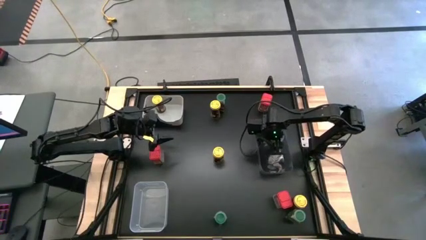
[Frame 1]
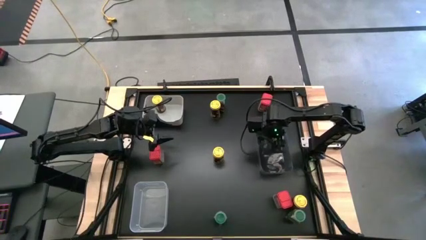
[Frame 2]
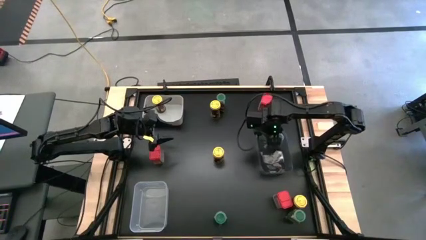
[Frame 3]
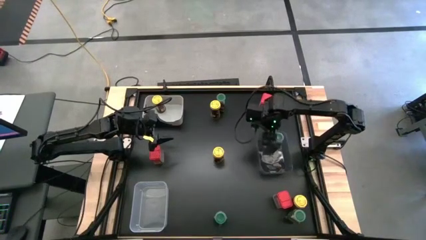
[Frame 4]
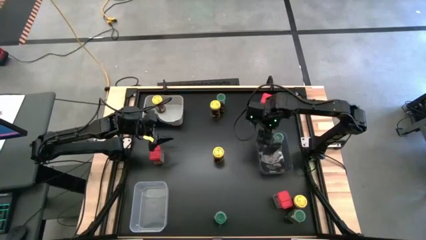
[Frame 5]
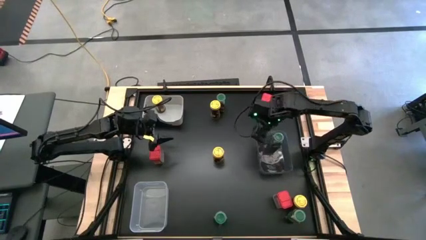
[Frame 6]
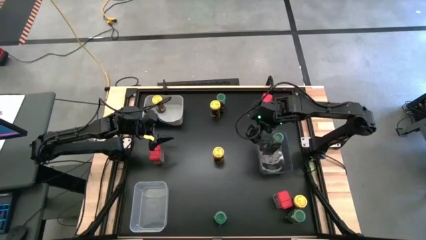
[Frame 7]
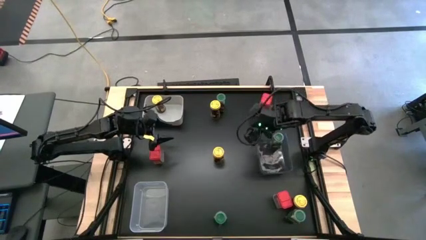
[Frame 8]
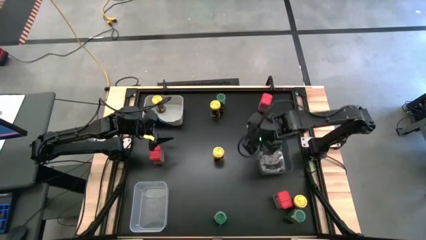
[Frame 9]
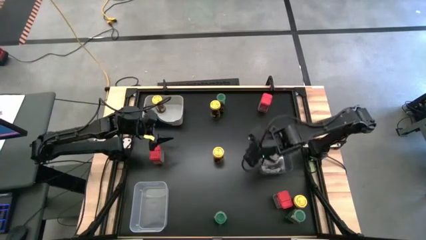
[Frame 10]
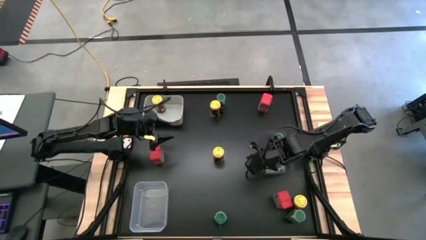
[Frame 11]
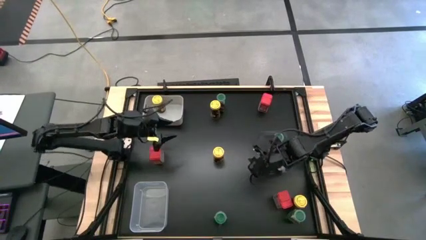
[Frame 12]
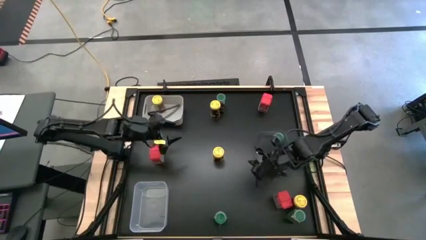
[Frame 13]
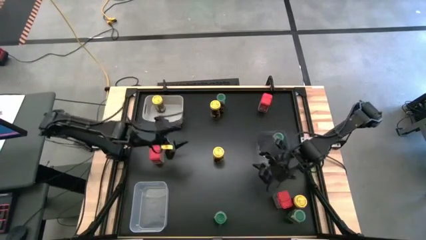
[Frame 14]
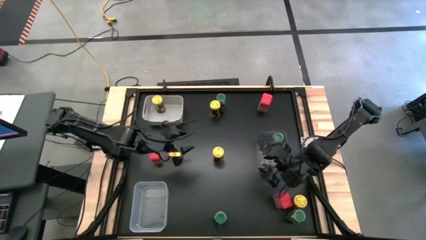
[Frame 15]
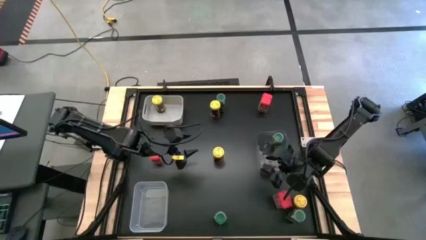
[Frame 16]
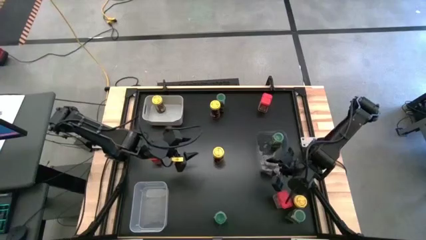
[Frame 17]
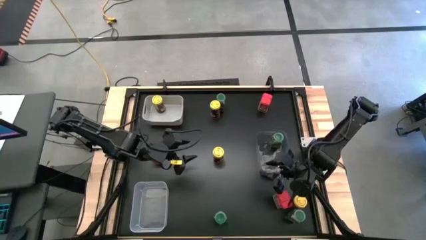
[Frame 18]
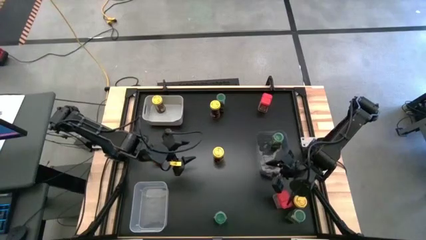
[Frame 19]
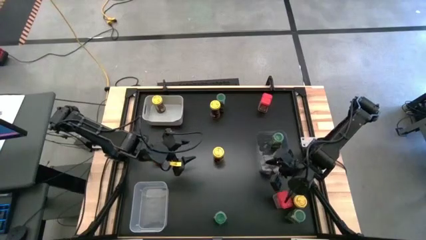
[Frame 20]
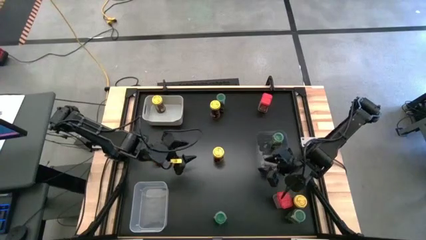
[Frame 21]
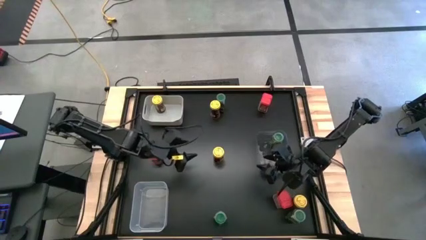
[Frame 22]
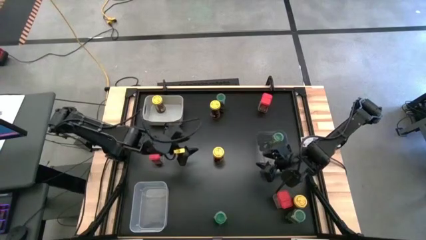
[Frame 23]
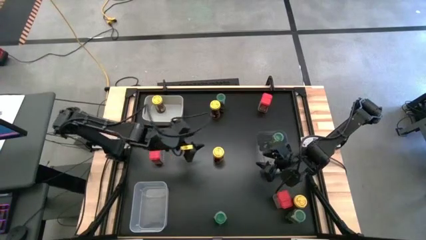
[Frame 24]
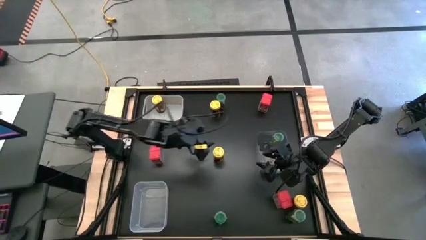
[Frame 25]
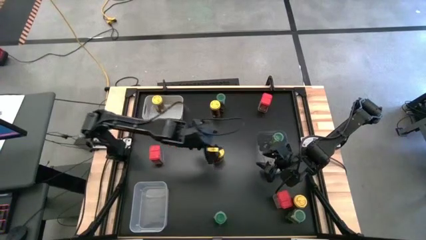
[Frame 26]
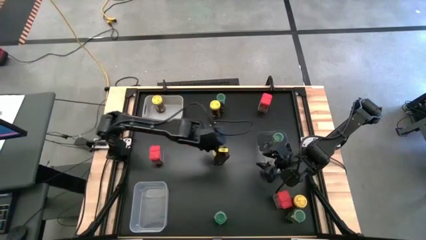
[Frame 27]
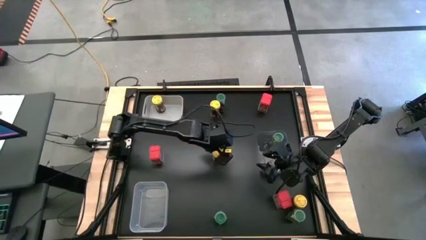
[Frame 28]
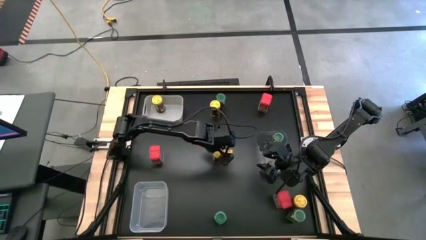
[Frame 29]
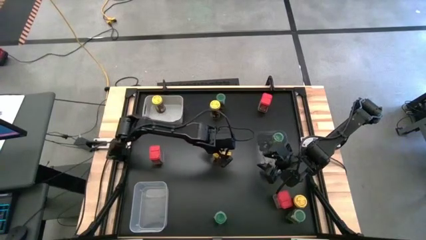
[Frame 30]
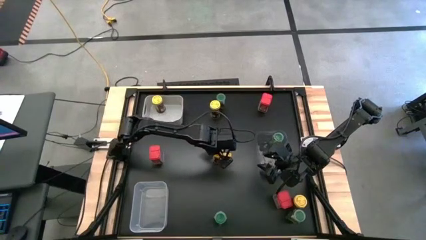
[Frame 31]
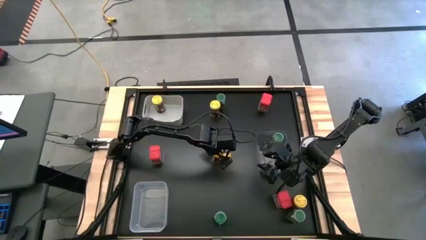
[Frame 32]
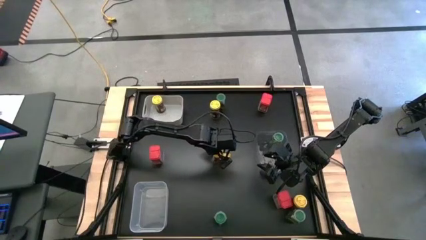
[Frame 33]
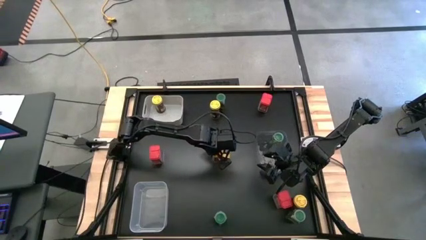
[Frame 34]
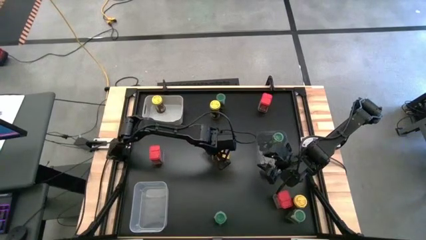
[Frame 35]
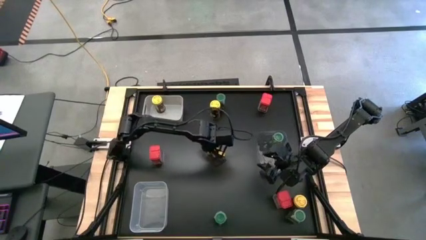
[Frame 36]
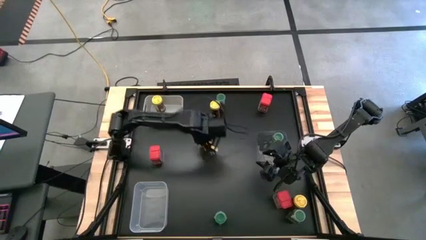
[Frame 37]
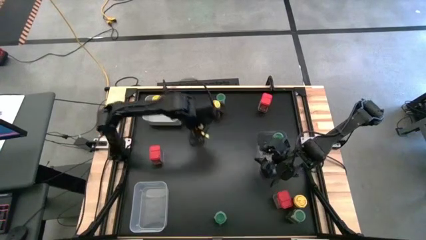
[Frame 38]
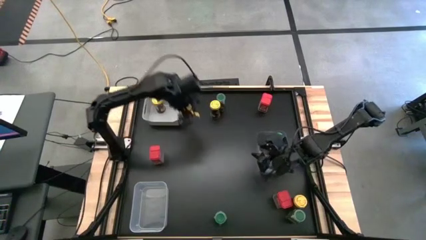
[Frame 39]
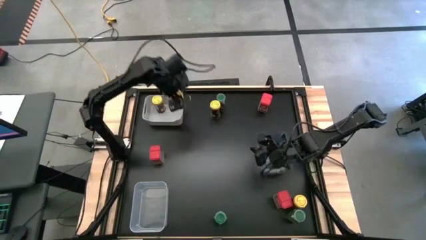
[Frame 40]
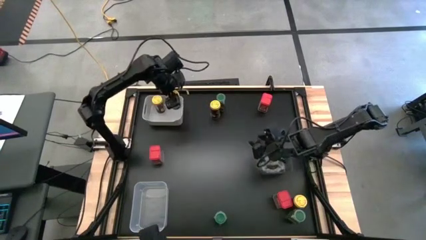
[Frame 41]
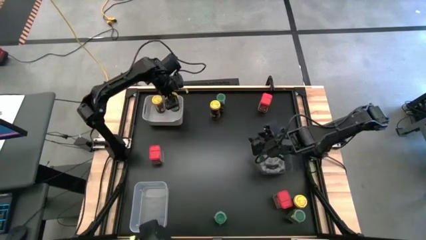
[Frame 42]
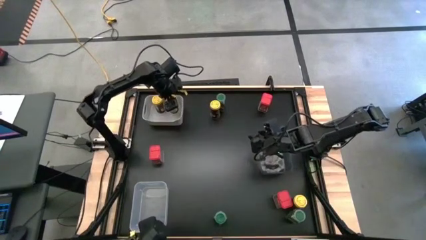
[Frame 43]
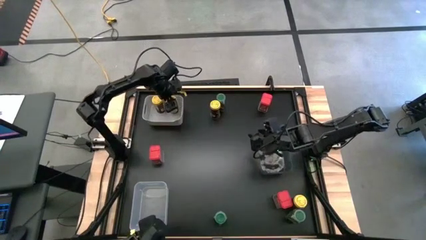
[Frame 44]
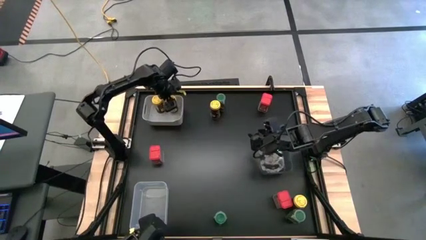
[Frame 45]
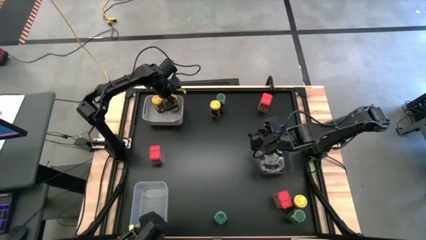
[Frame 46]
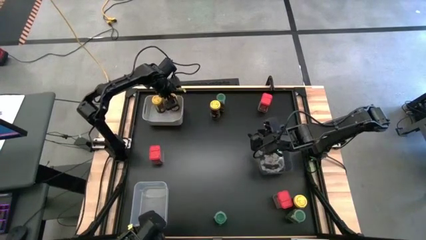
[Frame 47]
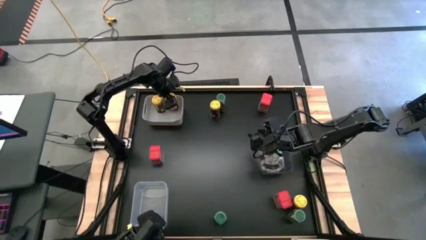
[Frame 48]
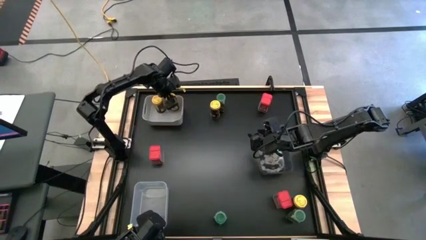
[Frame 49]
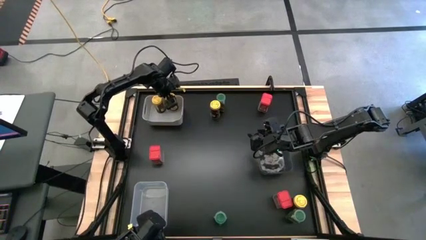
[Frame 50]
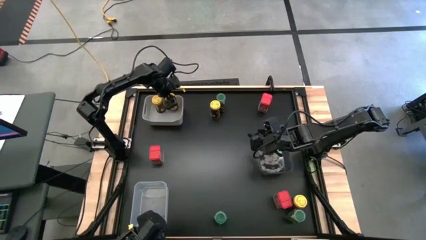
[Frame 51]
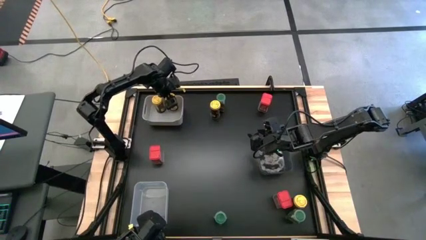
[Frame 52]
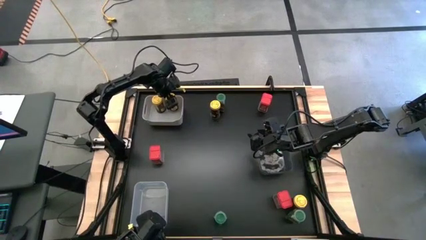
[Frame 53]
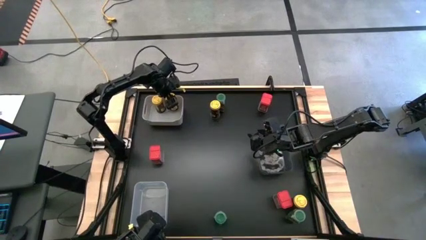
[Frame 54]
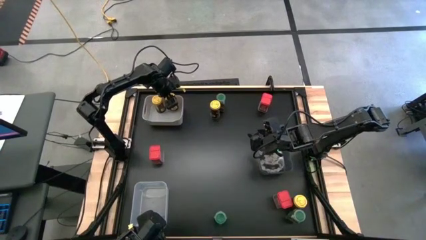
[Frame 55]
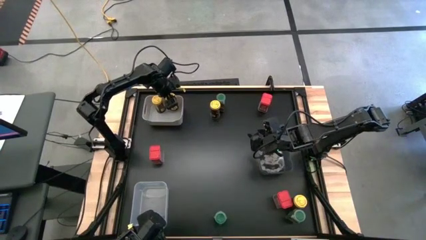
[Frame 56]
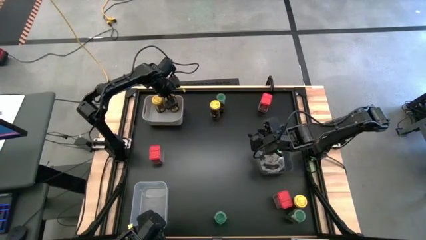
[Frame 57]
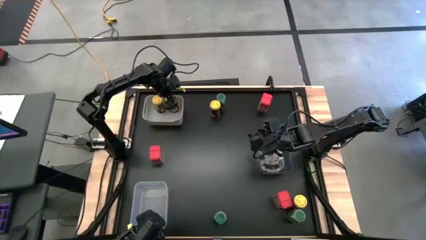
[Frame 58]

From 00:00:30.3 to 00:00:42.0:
Task: Sort spices by type
Put the middle yellow seasoning bottle into the gray bin
